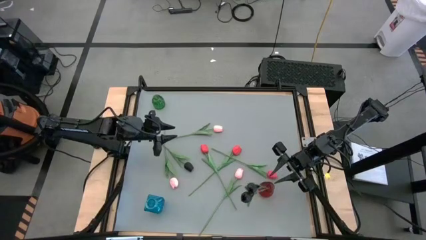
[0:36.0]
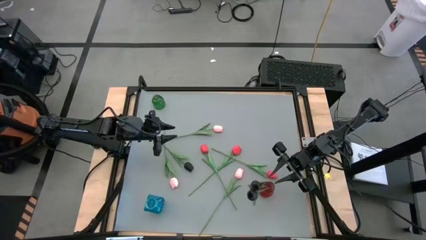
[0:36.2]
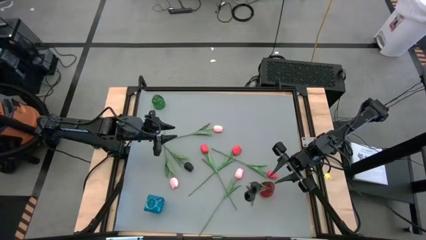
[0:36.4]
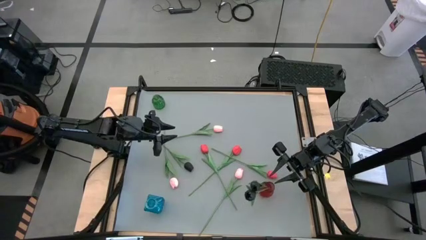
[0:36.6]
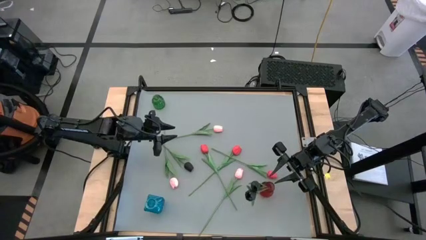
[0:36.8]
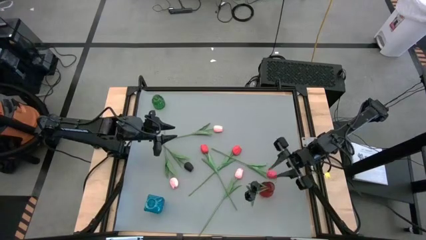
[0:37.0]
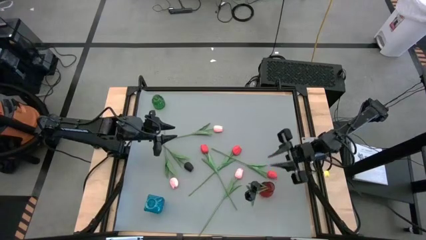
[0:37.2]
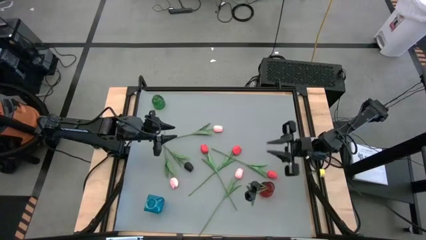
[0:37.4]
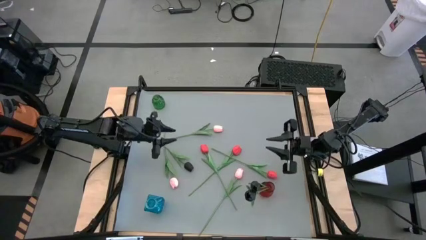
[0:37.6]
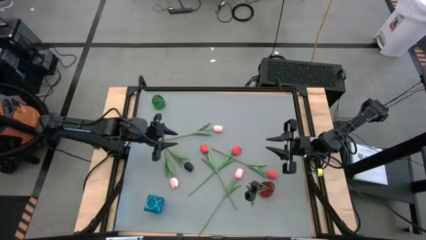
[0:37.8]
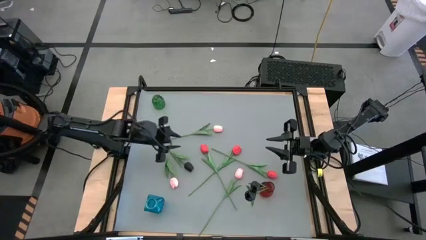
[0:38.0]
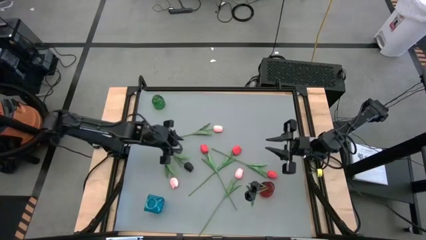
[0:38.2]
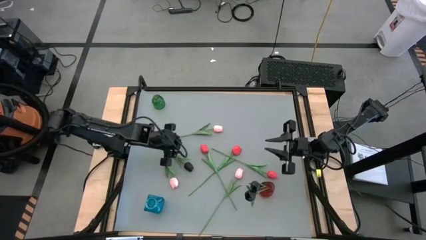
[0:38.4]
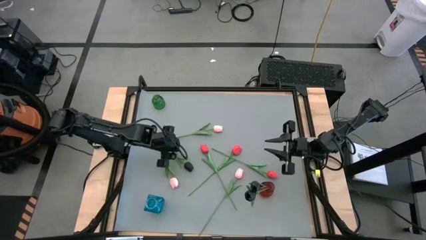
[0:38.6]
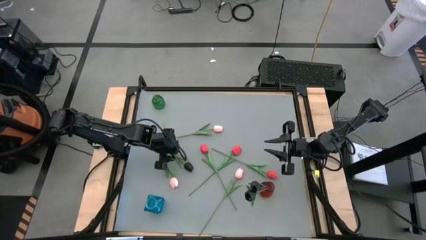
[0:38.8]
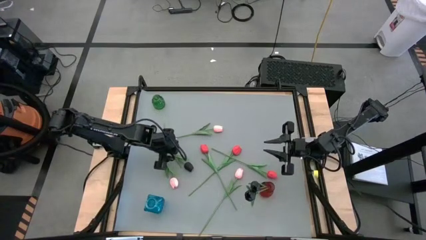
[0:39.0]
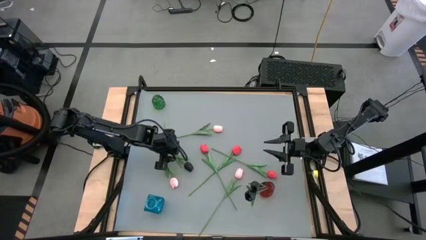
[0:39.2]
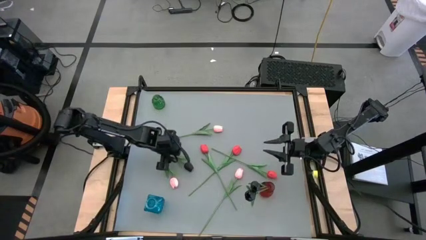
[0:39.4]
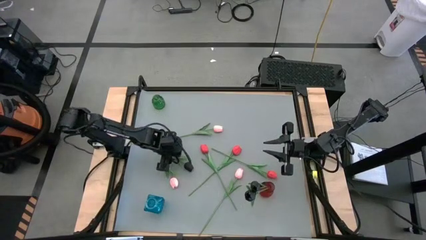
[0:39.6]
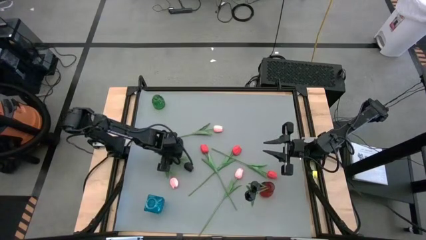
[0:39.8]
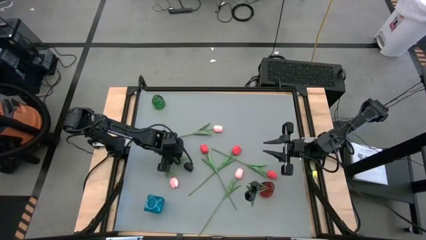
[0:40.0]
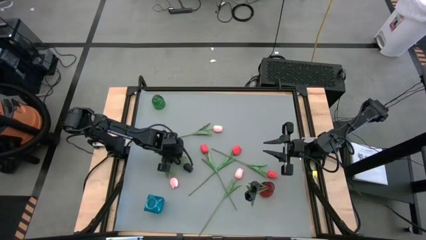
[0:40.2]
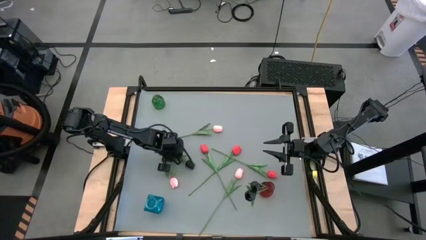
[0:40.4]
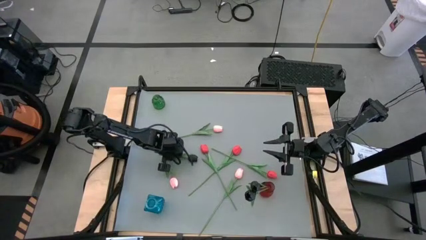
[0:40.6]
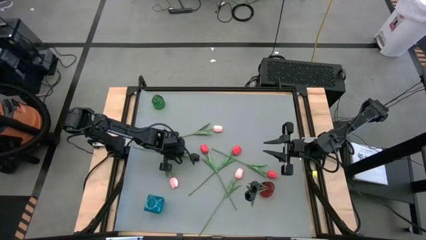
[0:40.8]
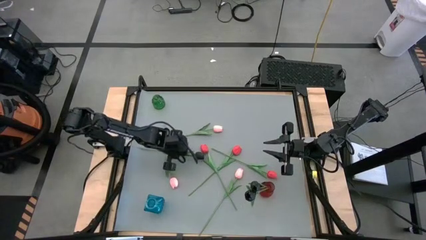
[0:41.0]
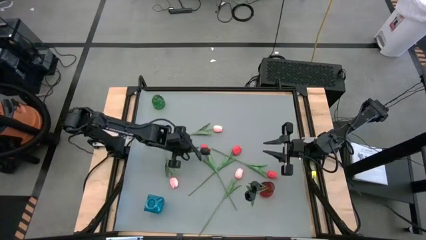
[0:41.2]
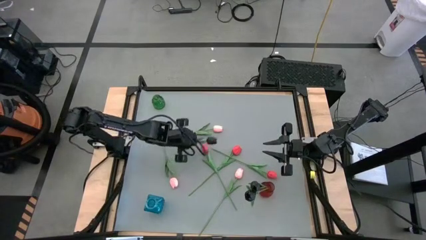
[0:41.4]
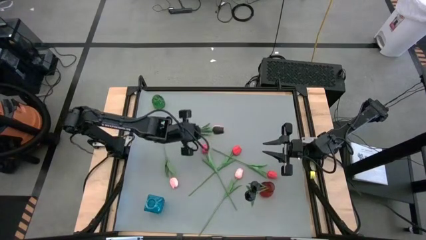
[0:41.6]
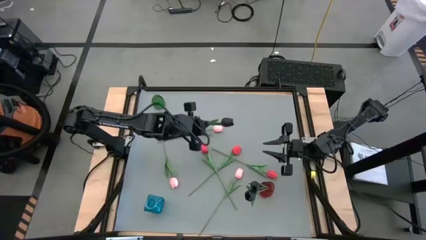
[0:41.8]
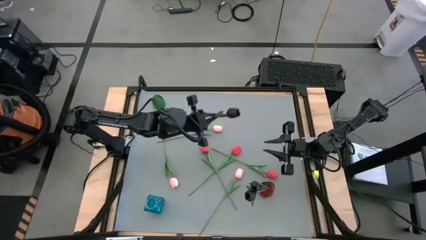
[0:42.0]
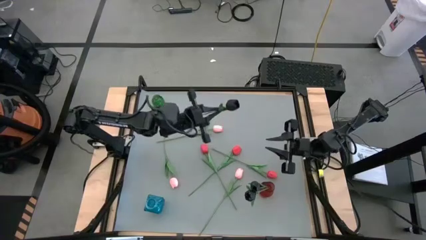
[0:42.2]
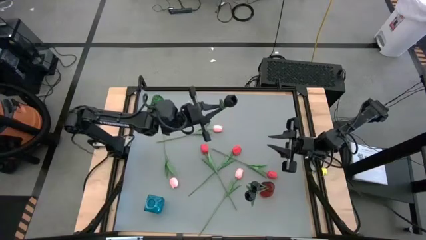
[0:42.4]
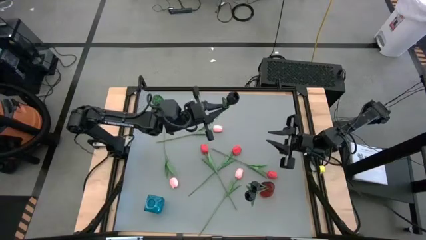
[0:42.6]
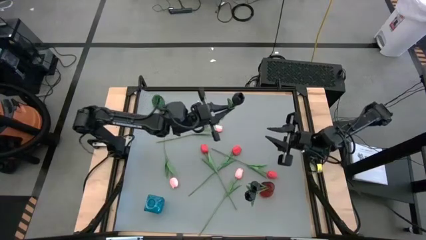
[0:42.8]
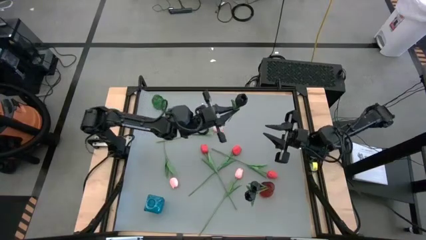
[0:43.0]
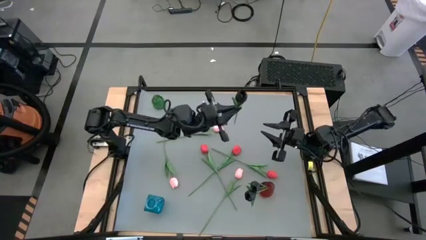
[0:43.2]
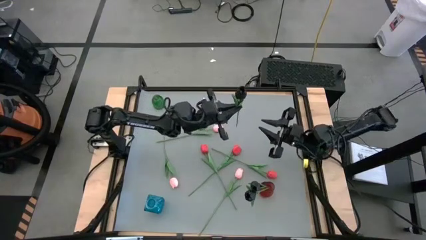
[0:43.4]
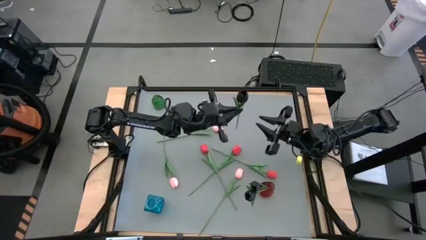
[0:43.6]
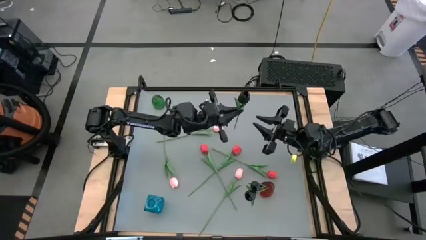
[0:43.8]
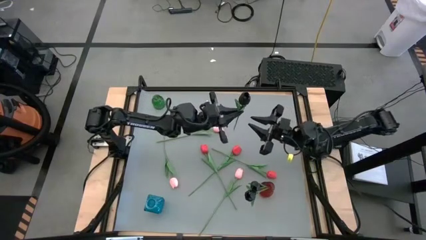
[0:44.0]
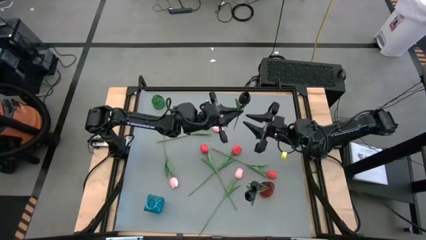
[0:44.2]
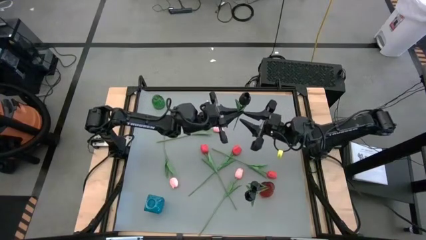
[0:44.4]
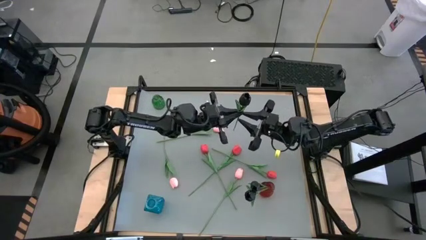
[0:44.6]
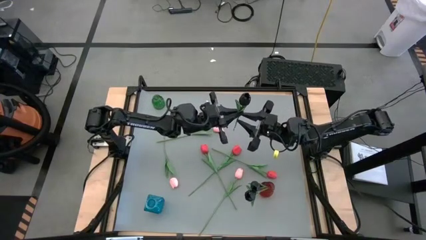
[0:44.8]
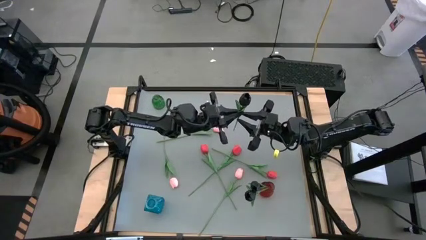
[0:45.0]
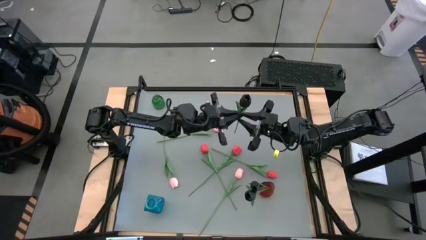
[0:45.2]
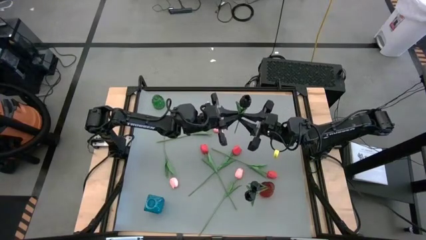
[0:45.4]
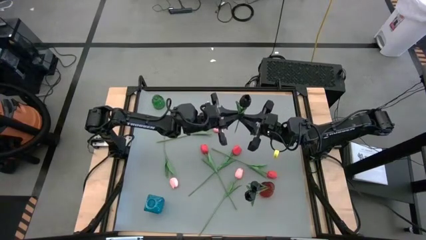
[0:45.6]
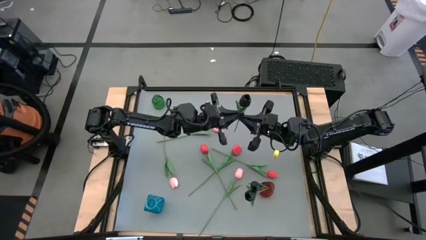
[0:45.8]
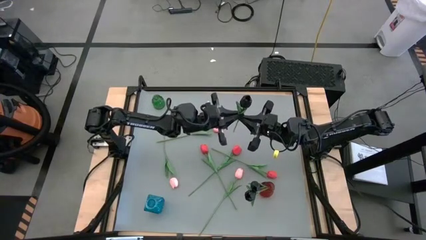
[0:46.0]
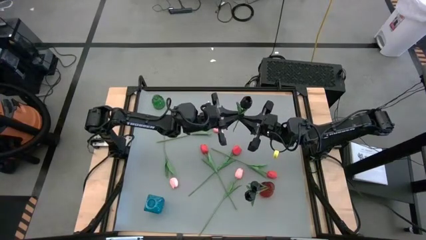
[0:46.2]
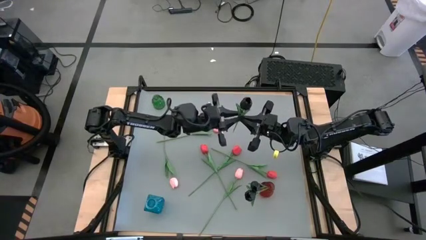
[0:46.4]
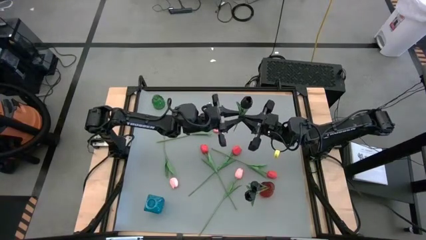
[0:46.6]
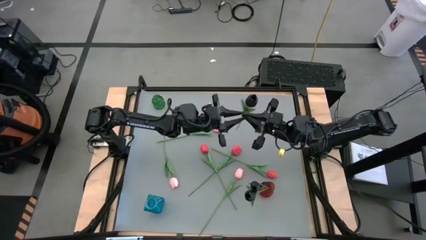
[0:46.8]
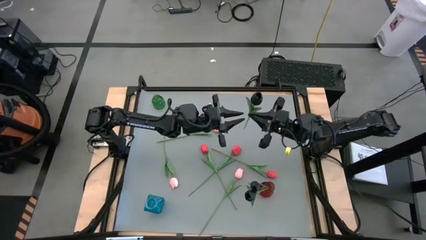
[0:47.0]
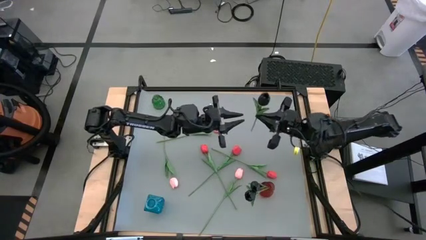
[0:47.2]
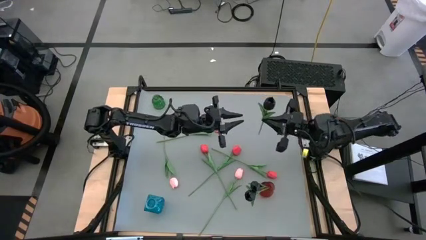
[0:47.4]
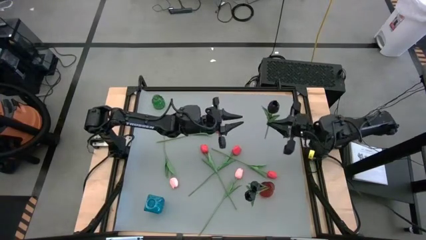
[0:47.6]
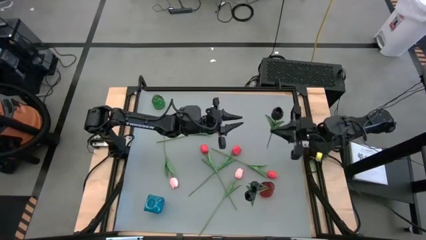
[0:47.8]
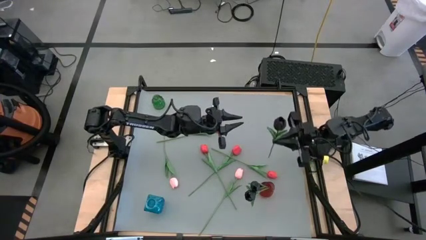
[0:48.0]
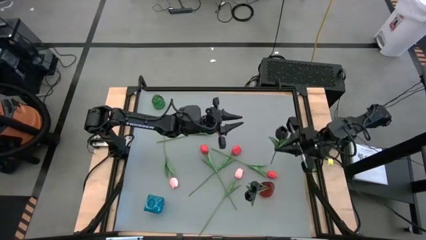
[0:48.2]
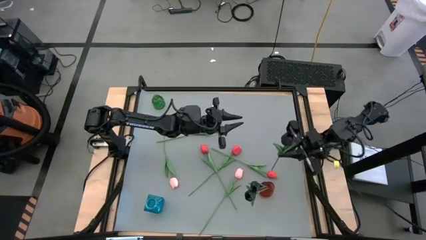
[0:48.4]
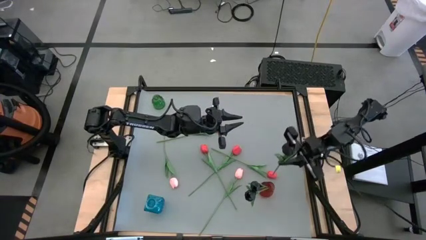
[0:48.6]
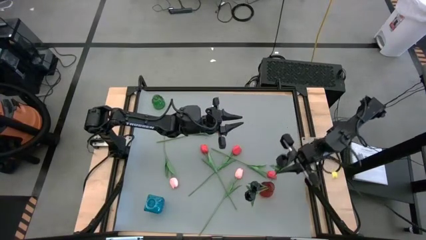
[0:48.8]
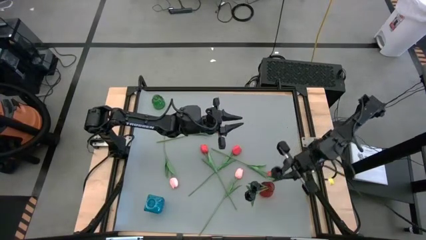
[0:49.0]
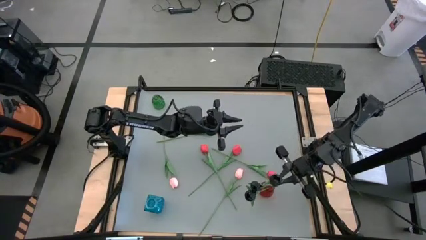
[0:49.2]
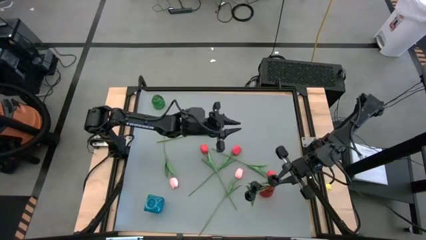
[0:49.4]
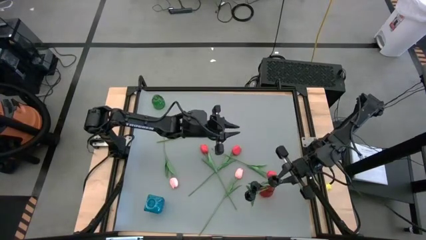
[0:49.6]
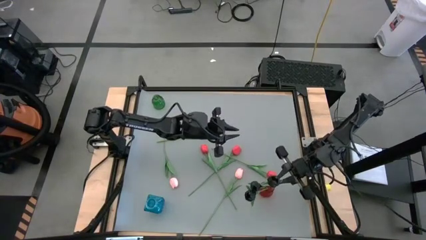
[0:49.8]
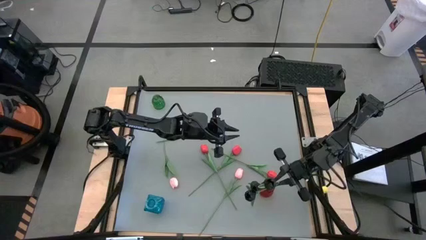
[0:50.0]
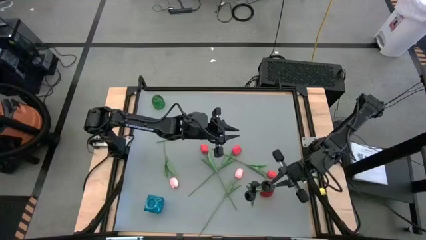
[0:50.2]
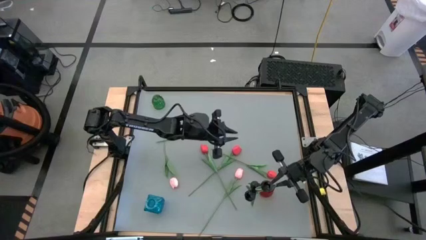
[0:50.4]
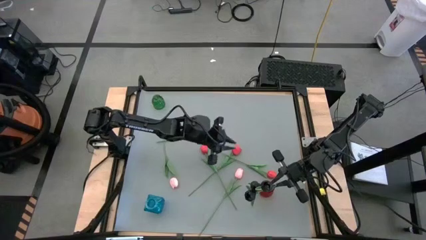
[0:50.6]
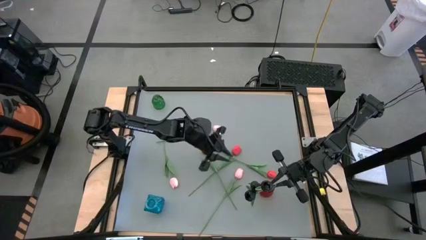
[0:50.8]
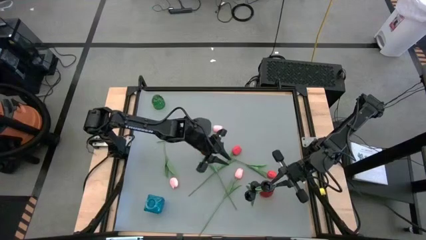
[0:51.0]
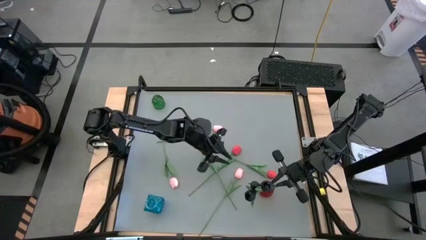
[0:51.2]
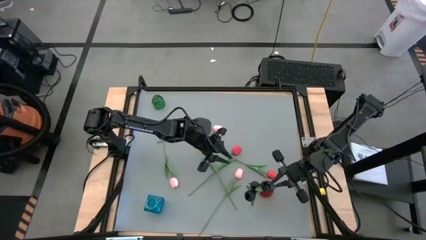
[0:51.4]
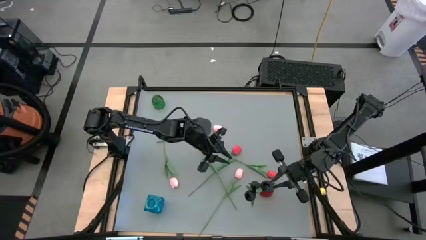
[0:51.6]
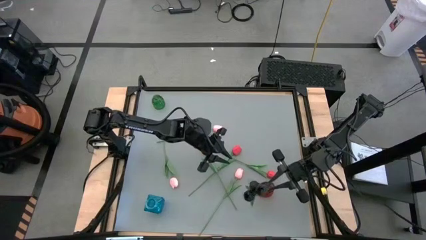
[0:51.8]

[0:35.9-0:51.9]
Task: Sort flowers into vase by color
Put the black flower into the red vase
